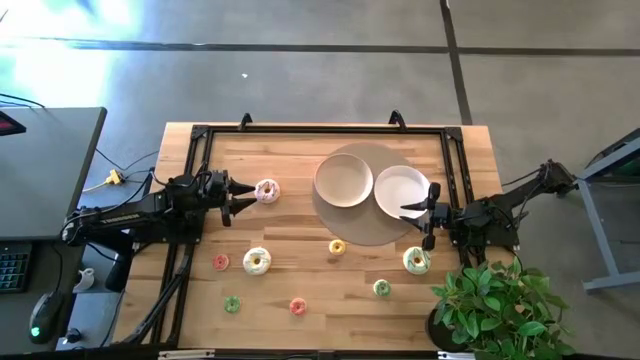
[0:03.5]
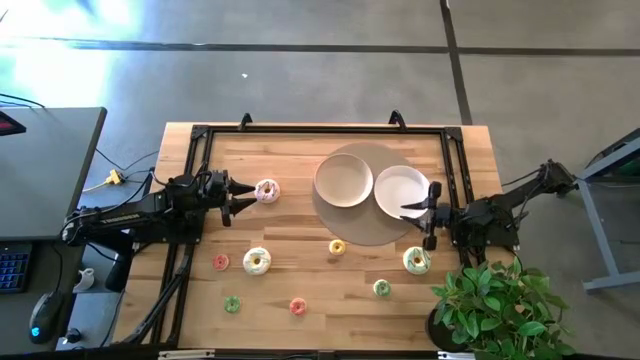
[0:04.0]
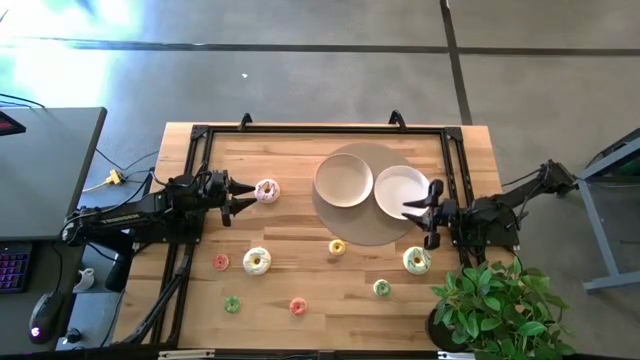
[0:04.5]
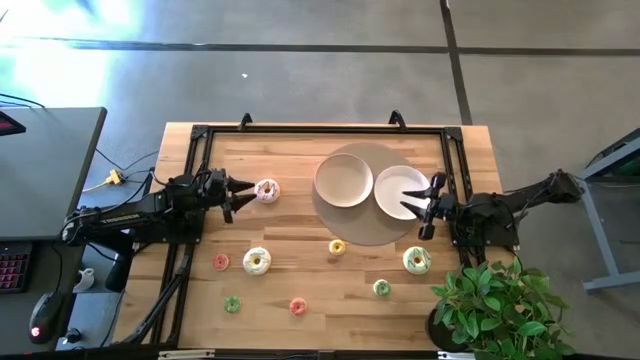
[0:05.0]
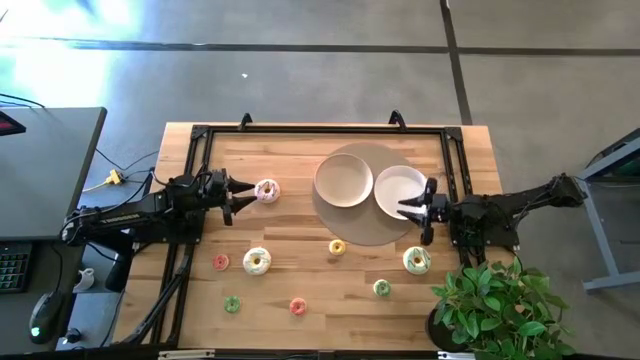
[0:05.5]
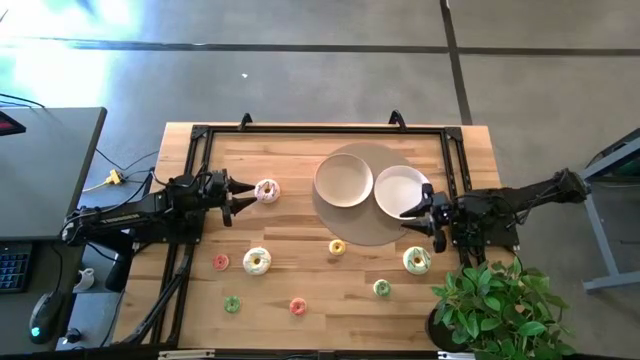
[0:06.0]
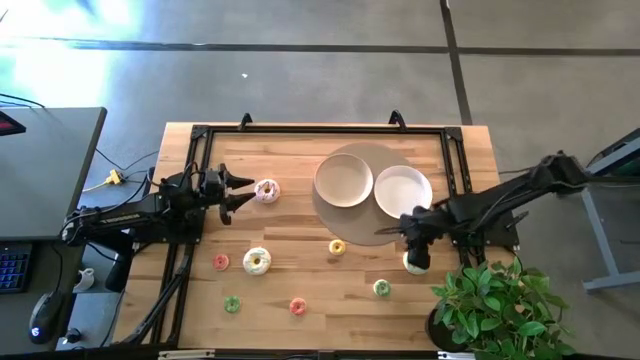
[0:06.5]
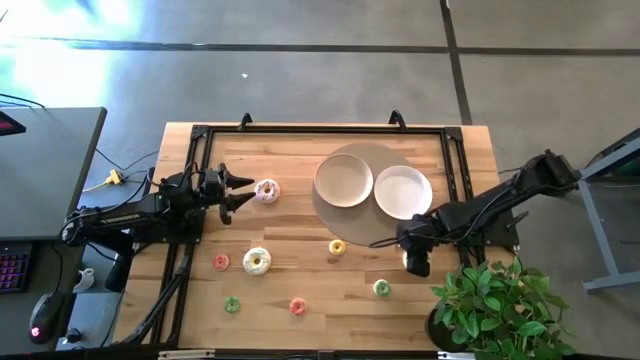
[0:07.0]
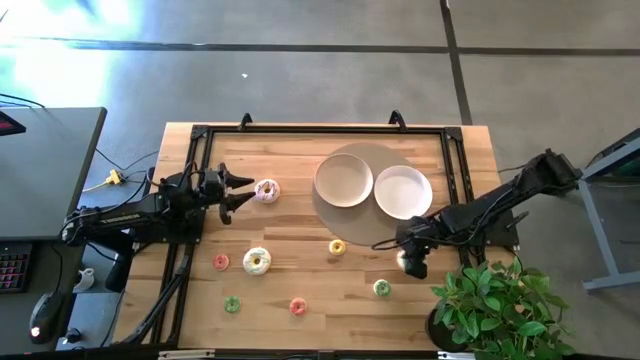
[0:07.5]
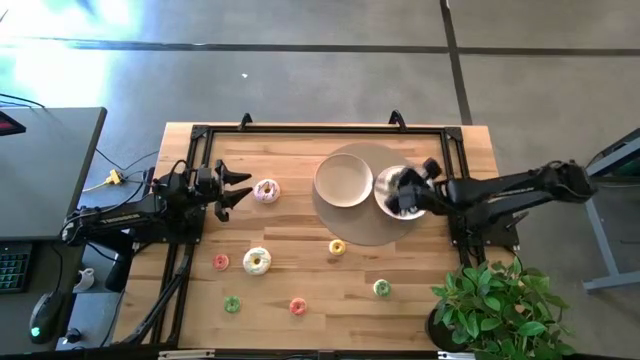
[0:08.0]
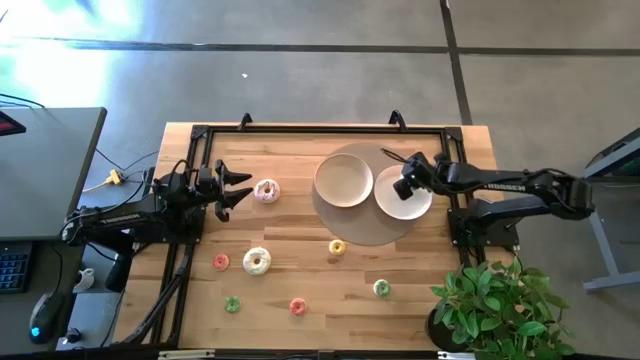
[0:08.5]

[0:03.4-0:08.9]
Task: Pick & Place donuts
Put the large blue doughnut on the right white plate

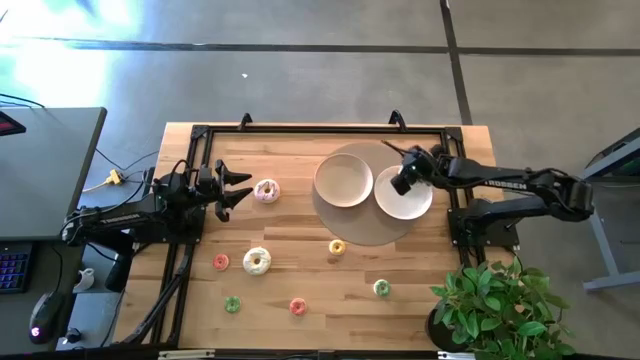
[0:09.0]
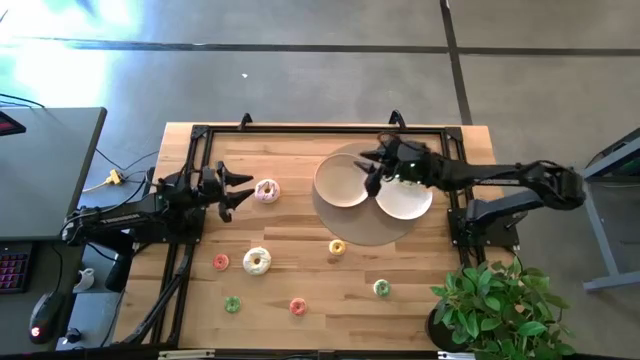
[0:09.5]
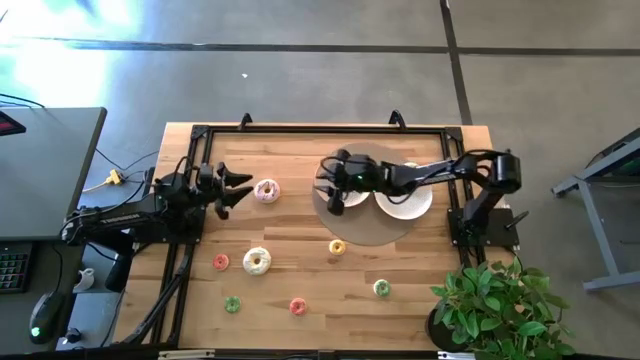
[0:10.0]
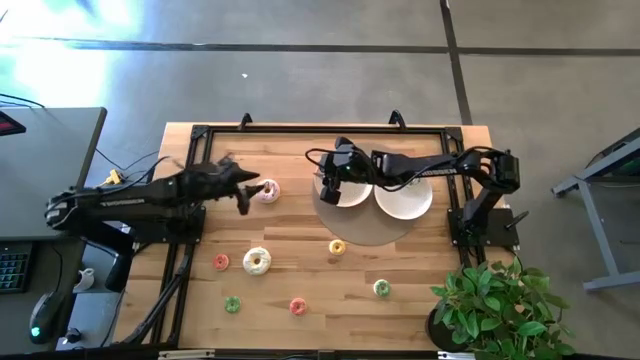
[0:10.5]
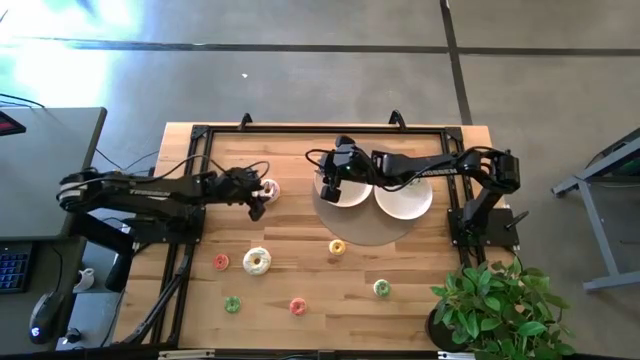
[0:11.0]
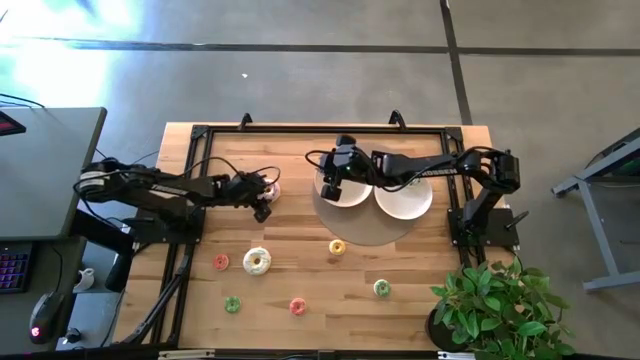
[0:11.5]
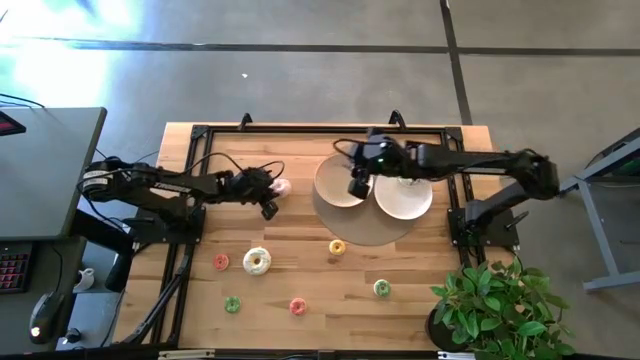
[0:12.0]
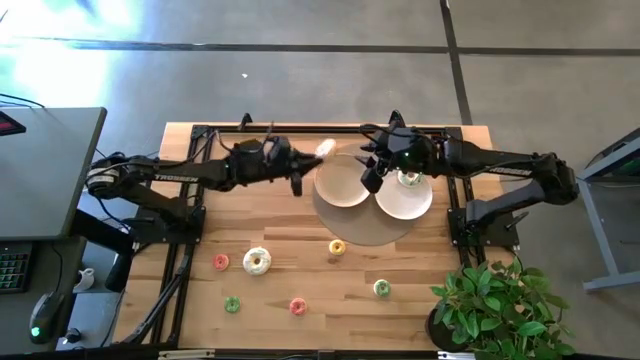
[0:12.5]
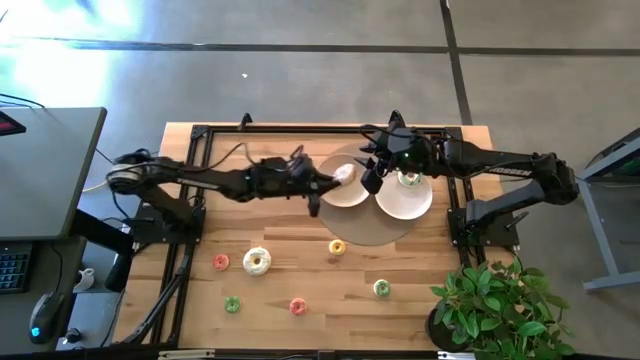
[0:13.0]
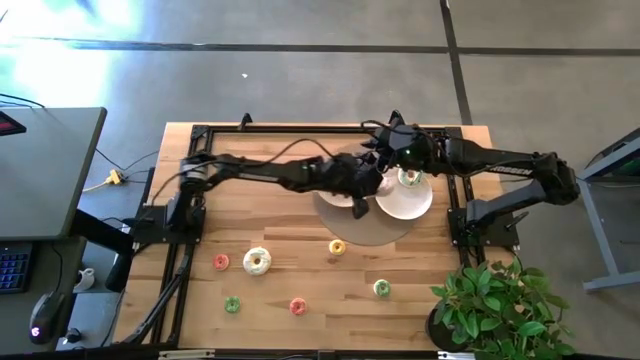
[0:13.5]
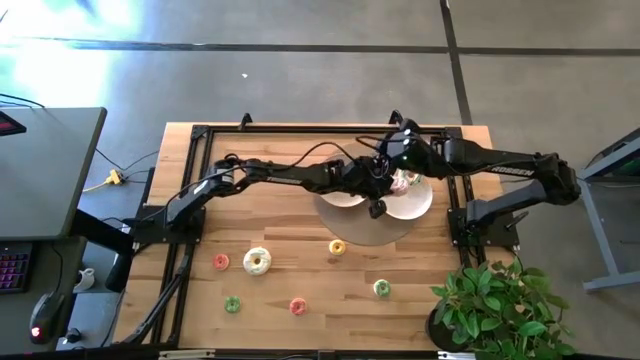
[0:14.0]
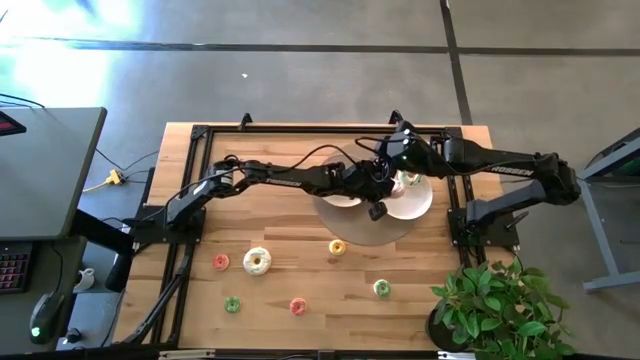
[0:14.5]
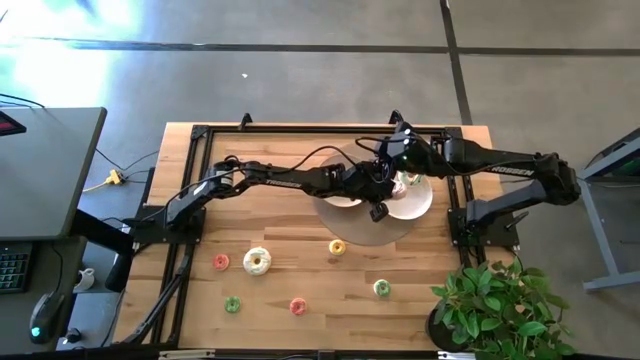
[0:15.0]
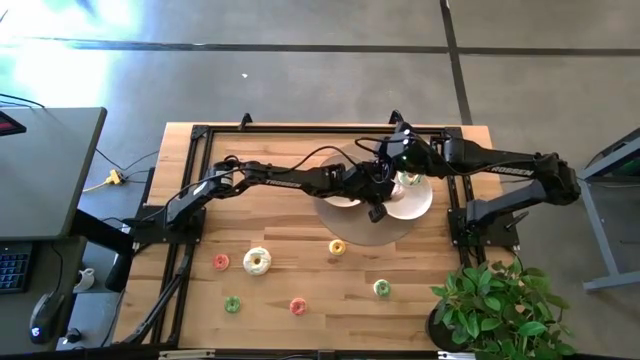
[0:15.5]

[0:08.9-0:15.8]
Put the large light purple doughnut on the right white plate

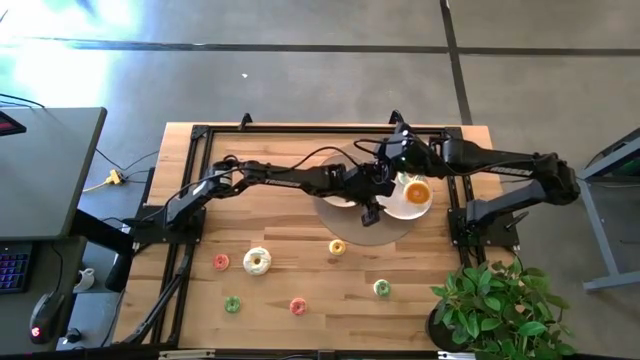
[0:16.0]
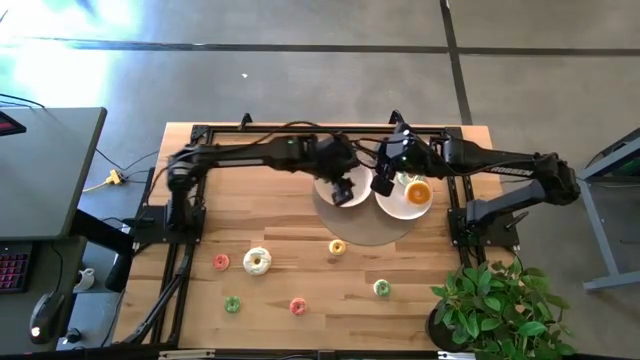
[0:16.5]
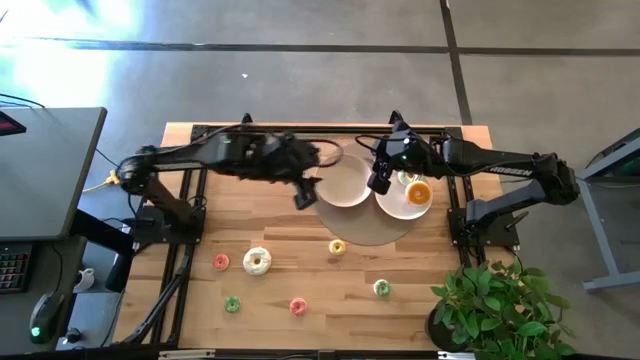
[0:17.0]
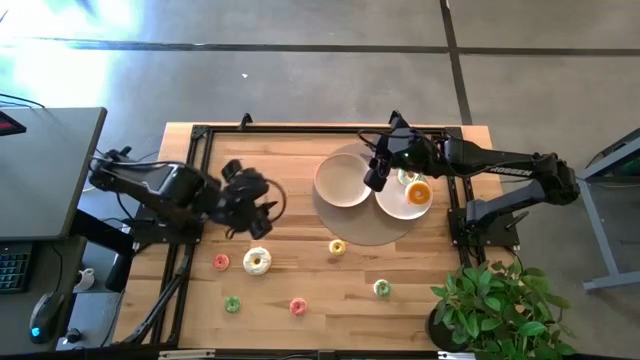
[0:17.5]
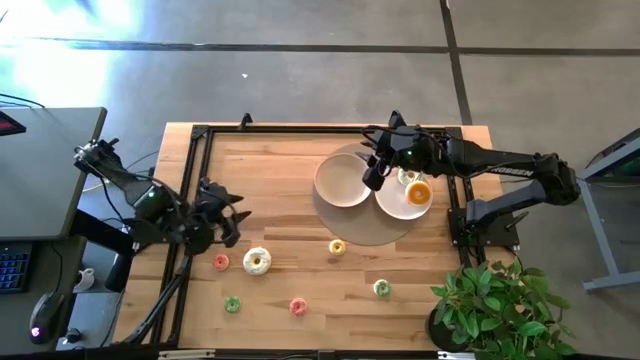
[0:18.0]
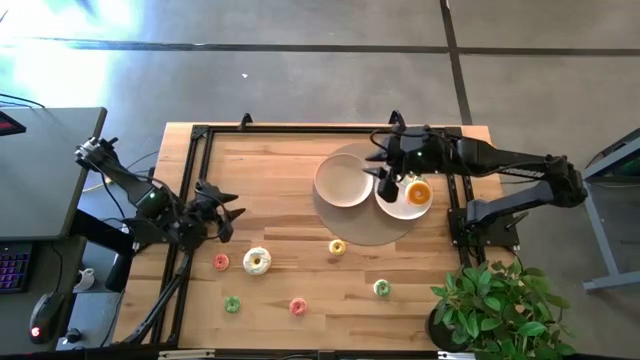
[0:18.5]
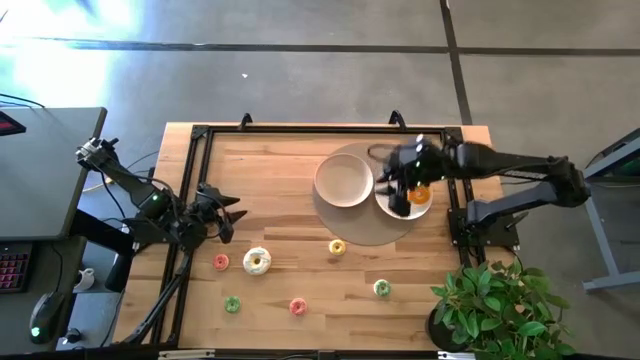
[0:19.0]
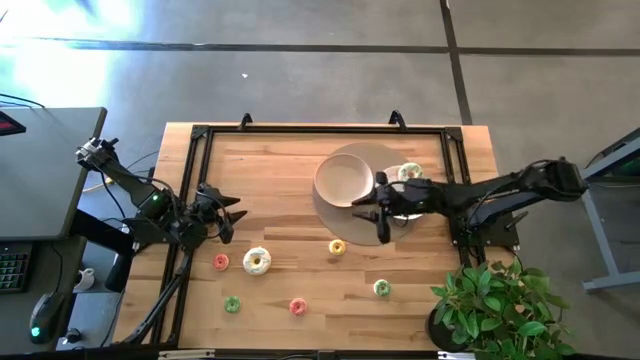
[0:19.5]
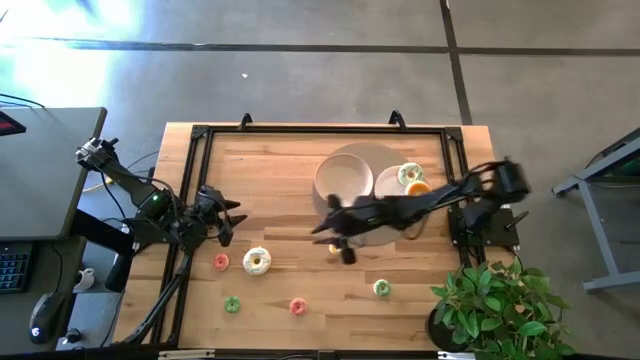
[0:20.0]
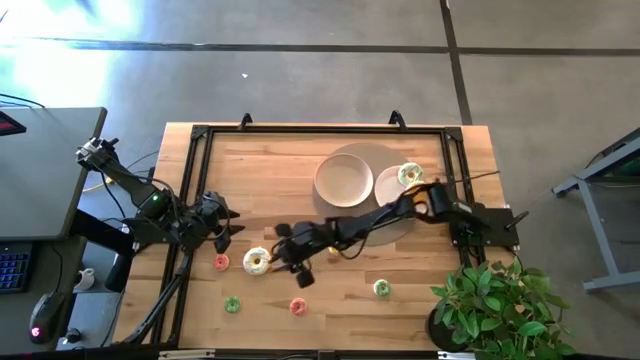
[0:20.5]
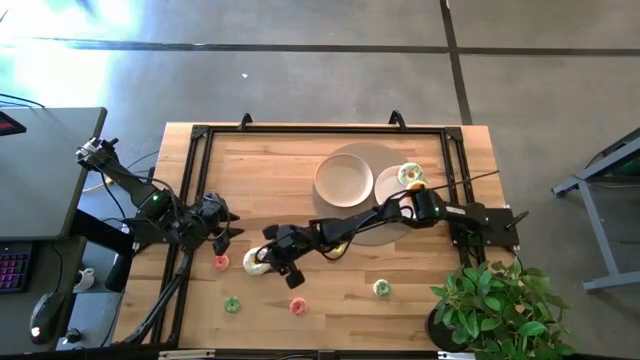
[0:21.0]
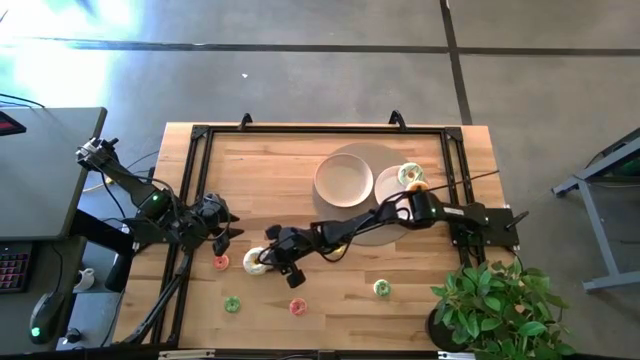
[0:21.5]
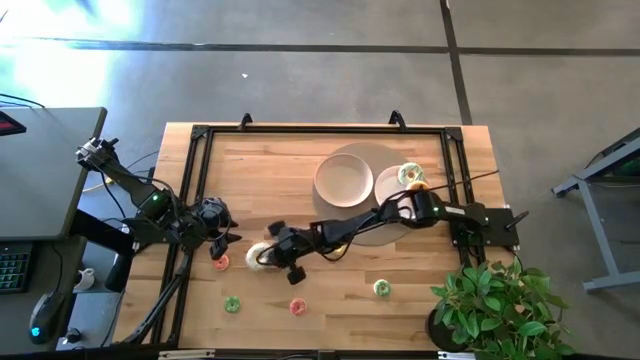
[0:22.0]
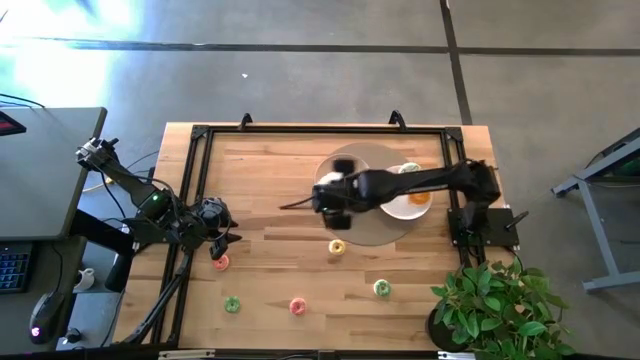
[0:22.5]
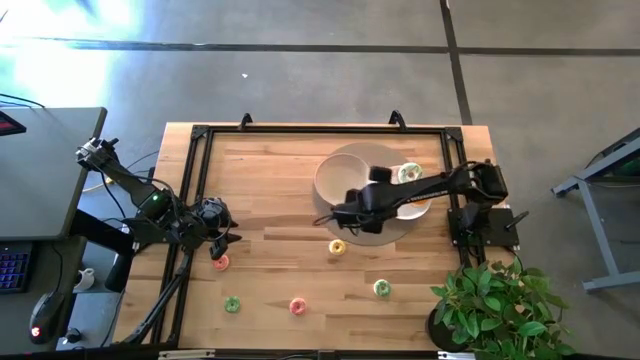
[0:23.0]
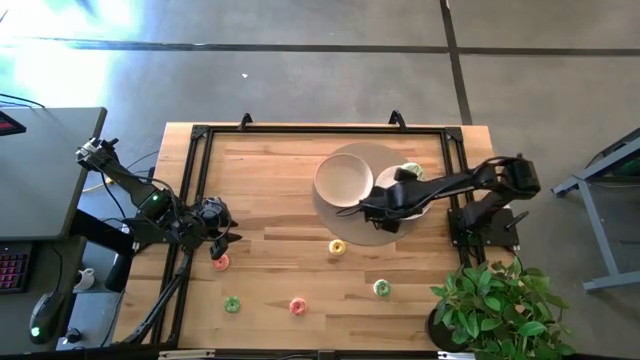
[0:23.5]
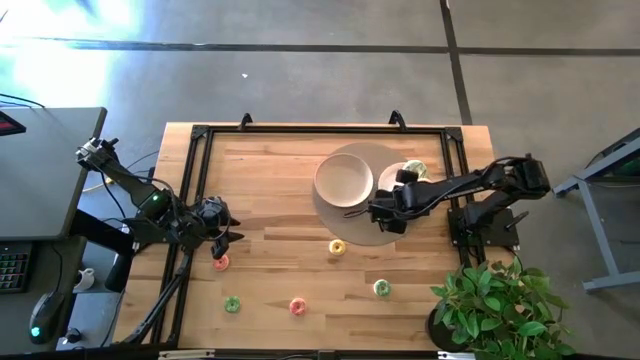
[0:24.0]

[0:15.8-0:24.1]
Put the large white doughnut on the right white plate

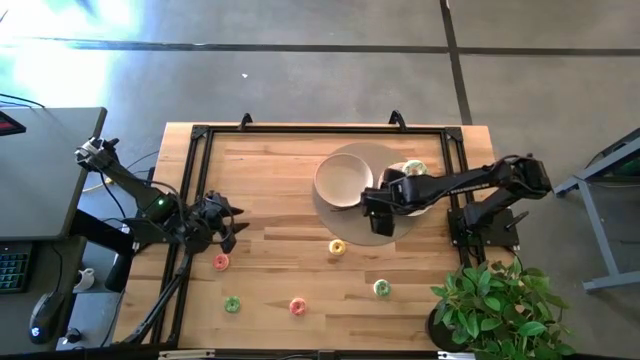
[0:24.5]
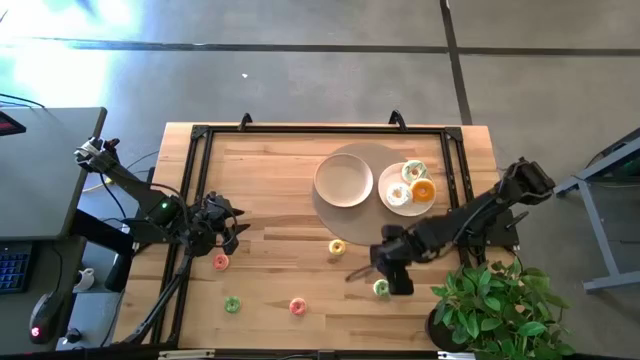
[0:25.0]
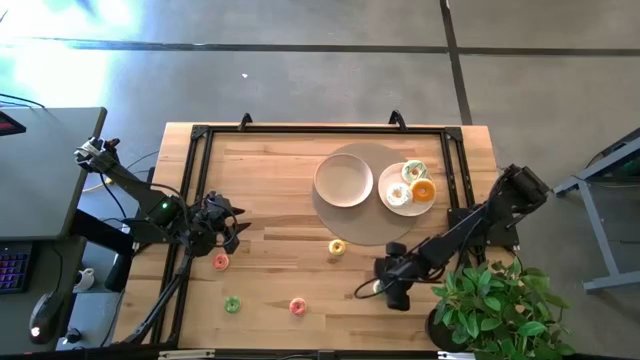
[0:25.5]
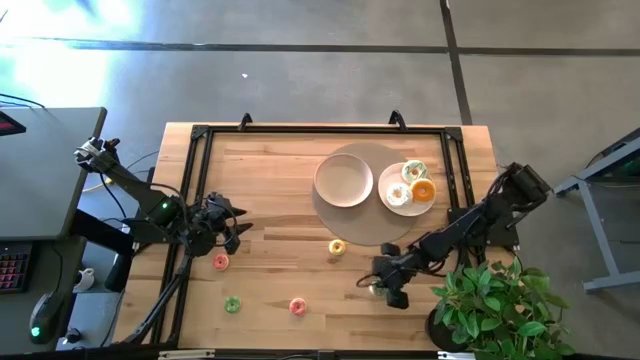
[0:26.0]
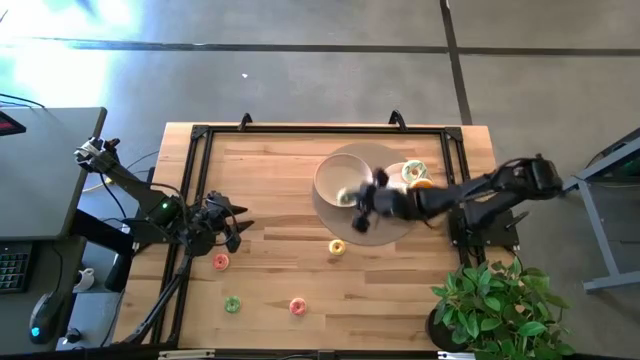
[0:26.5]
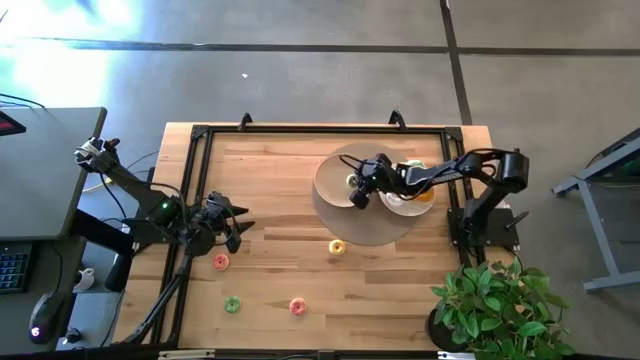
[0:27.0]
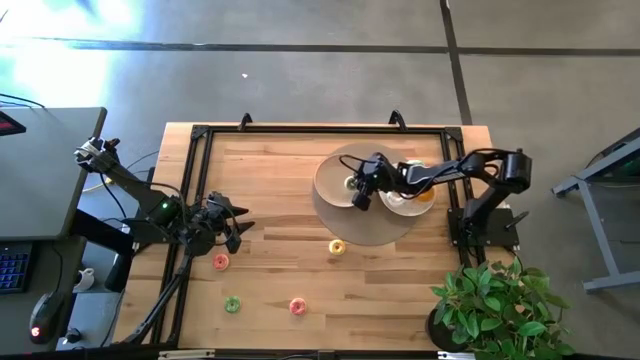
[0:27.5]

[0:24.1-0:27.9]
Put the right small green doughnut on the left white plate
